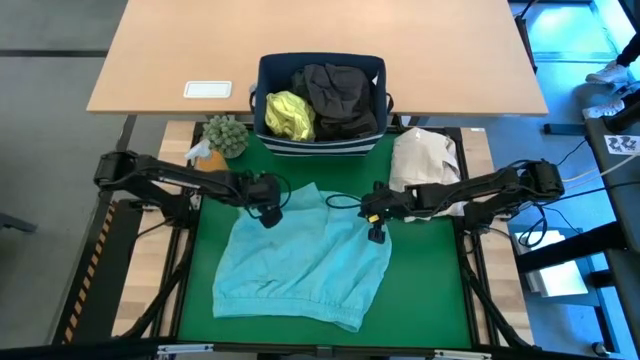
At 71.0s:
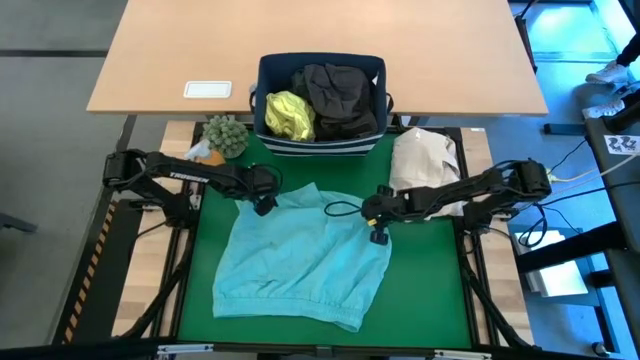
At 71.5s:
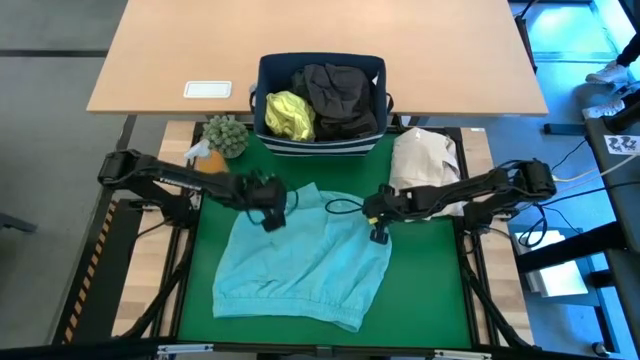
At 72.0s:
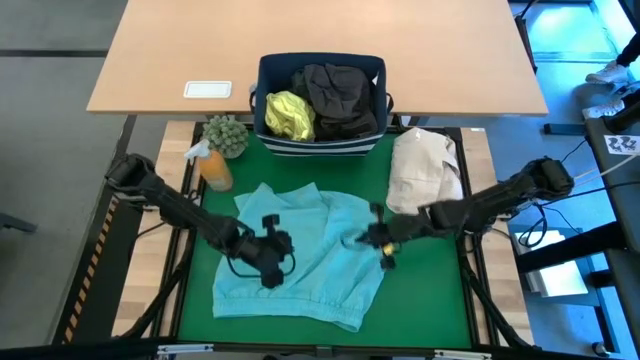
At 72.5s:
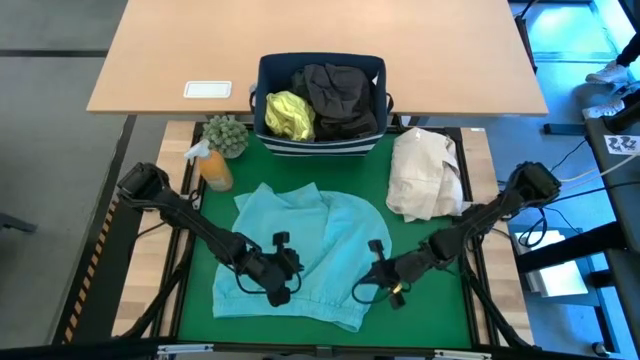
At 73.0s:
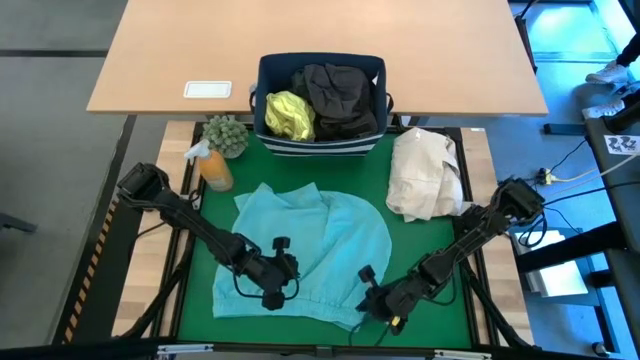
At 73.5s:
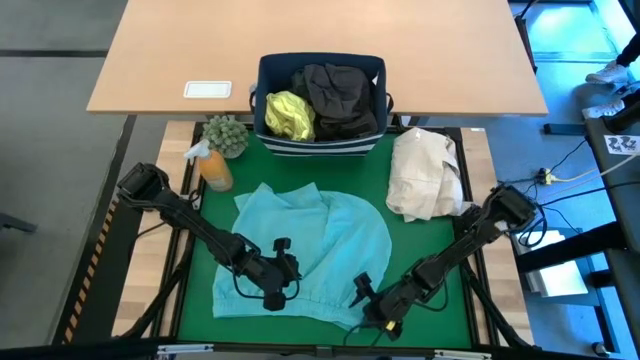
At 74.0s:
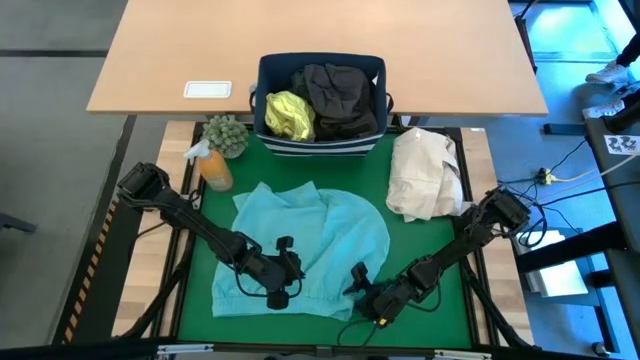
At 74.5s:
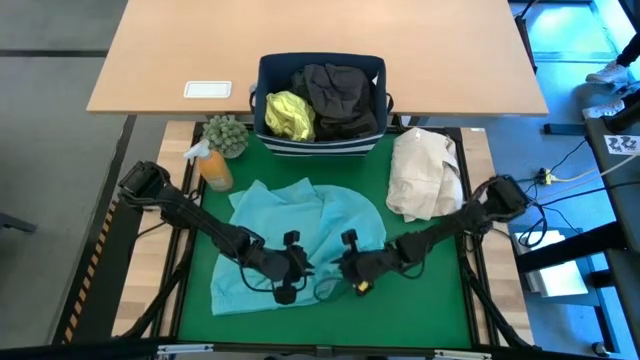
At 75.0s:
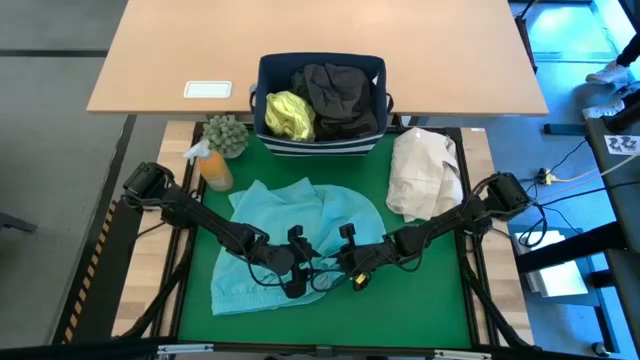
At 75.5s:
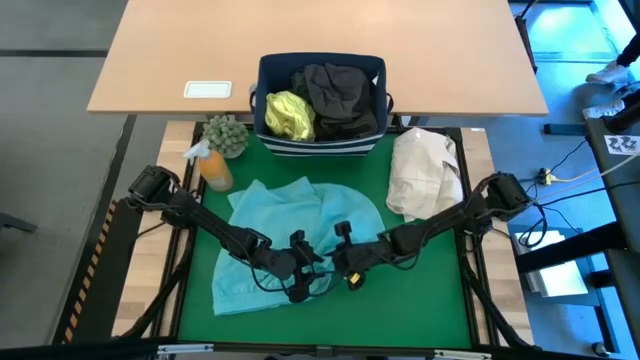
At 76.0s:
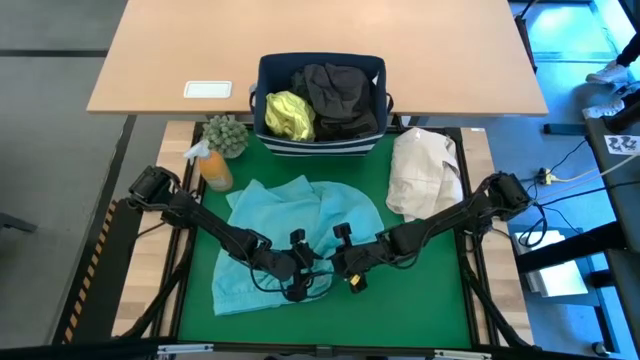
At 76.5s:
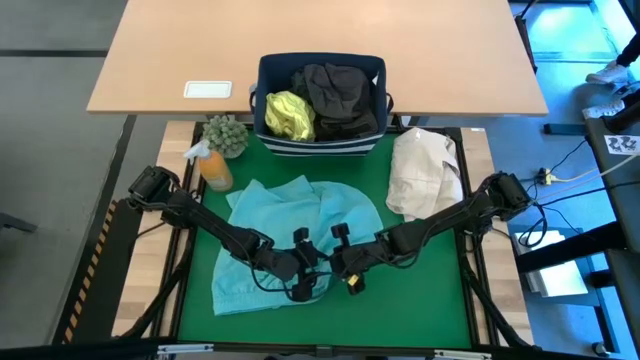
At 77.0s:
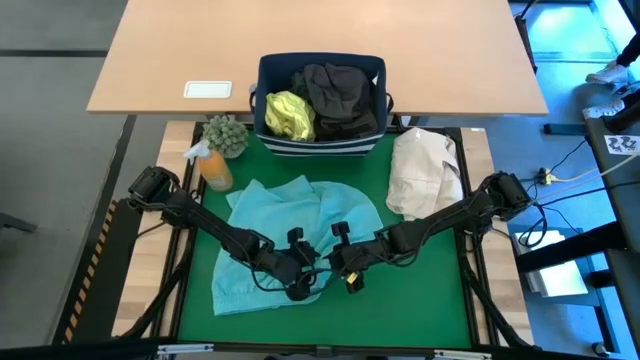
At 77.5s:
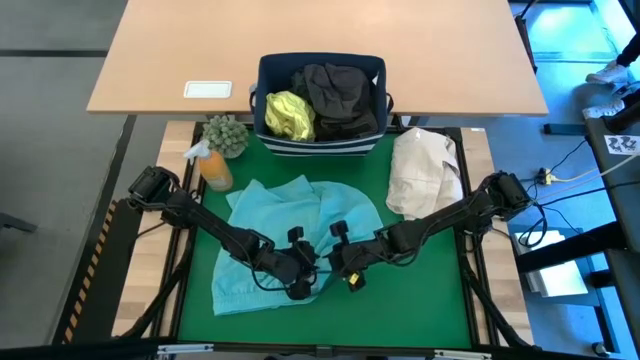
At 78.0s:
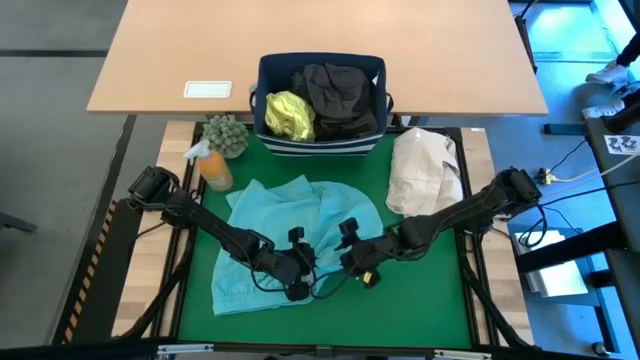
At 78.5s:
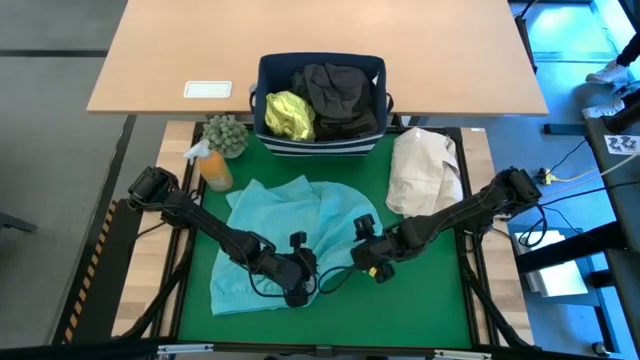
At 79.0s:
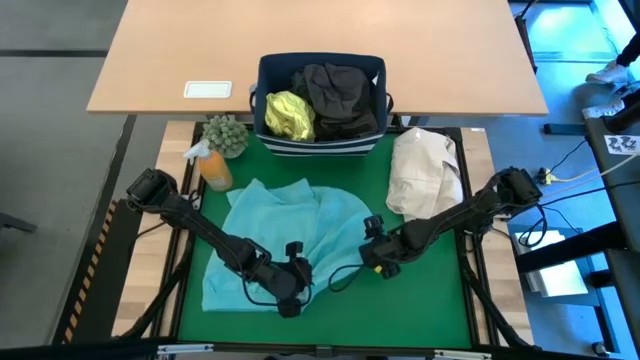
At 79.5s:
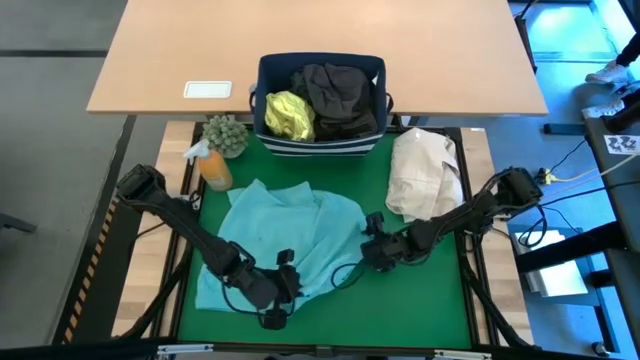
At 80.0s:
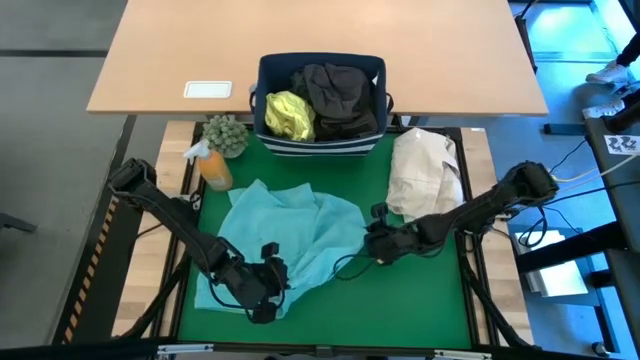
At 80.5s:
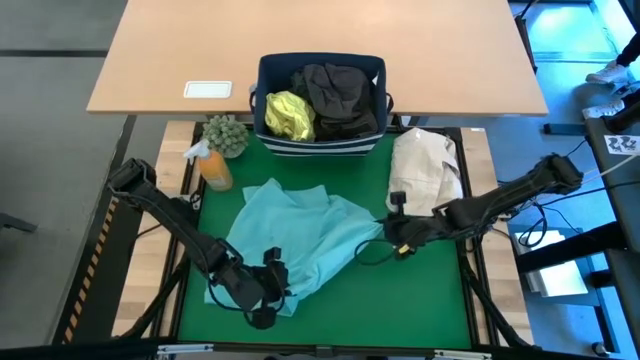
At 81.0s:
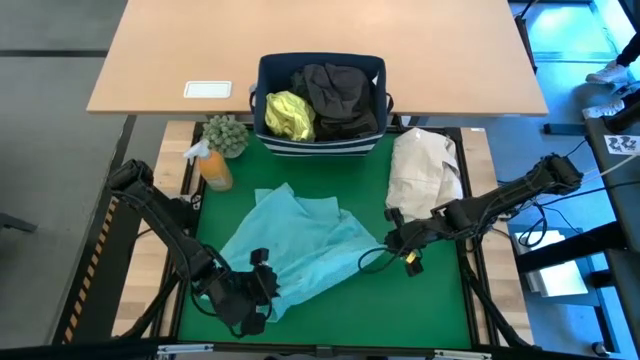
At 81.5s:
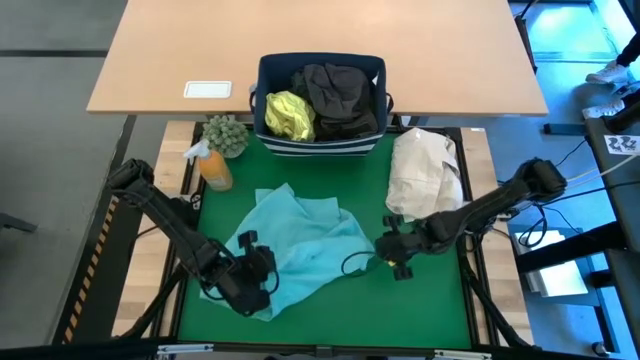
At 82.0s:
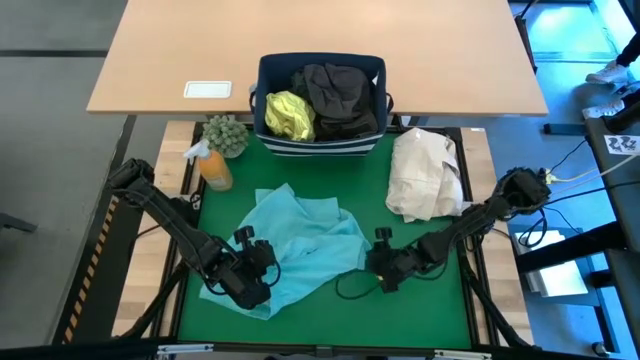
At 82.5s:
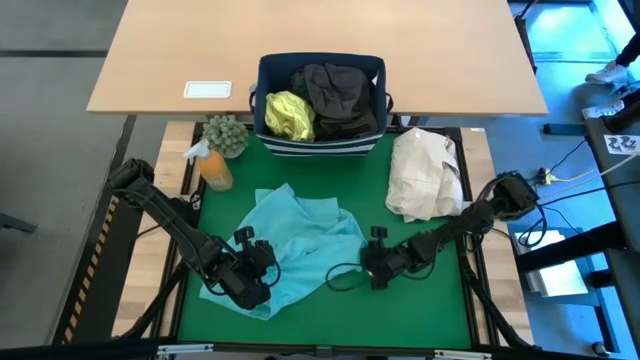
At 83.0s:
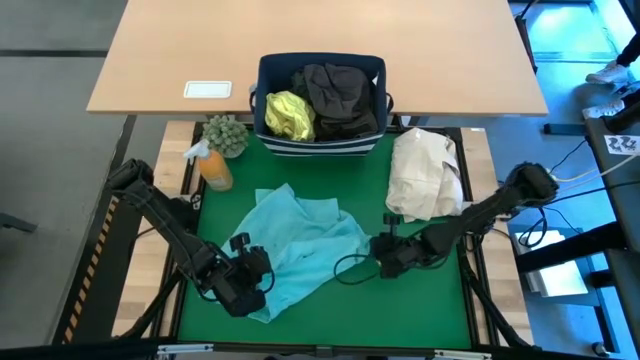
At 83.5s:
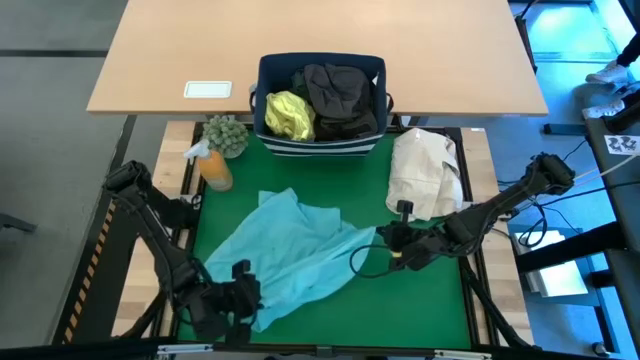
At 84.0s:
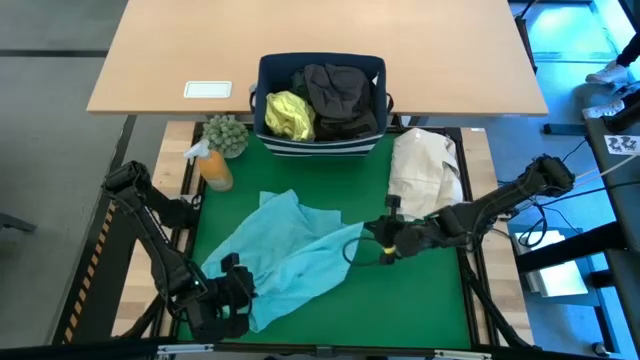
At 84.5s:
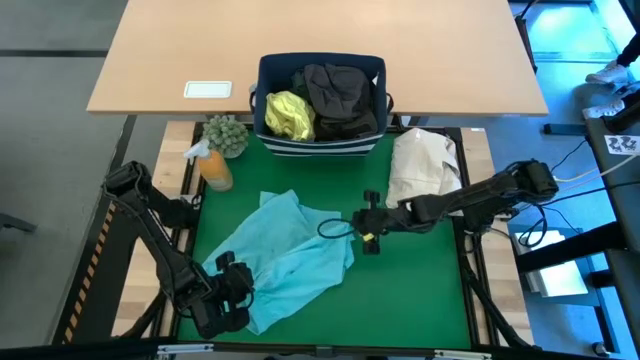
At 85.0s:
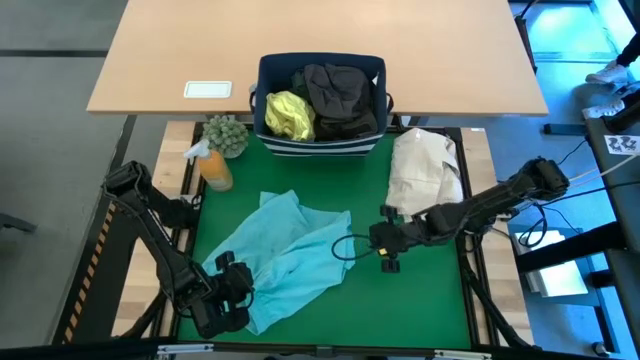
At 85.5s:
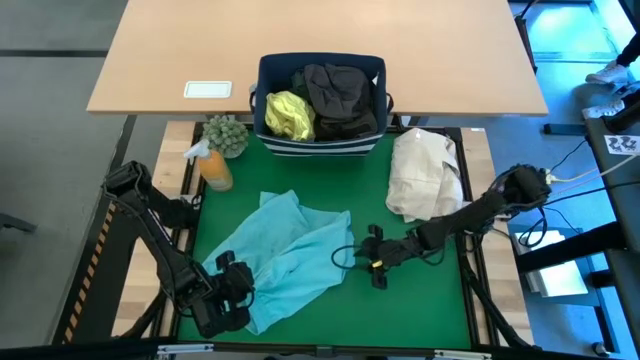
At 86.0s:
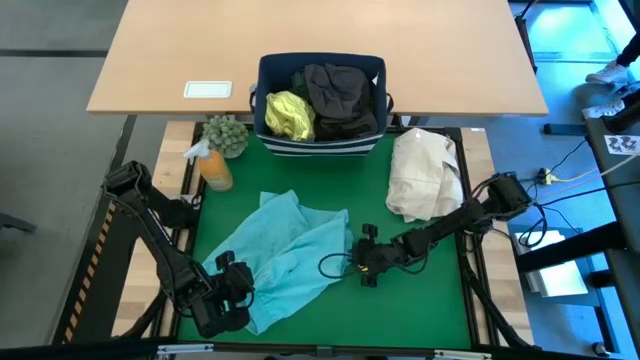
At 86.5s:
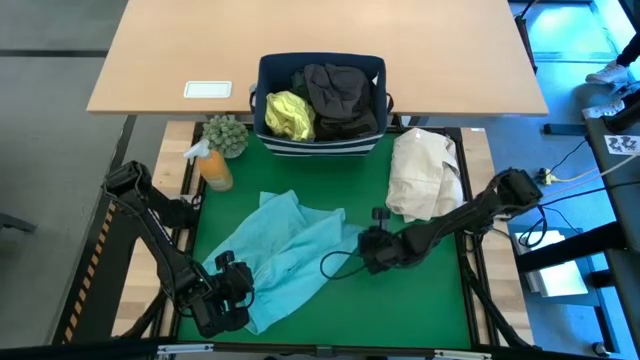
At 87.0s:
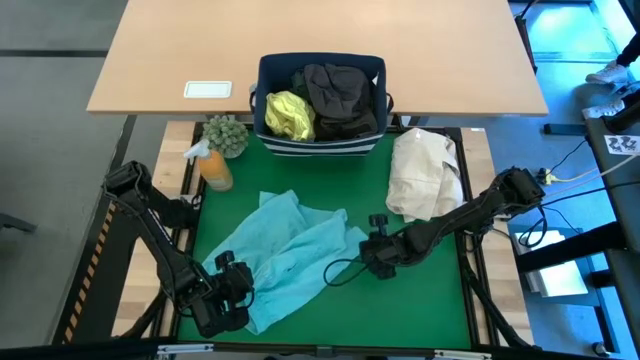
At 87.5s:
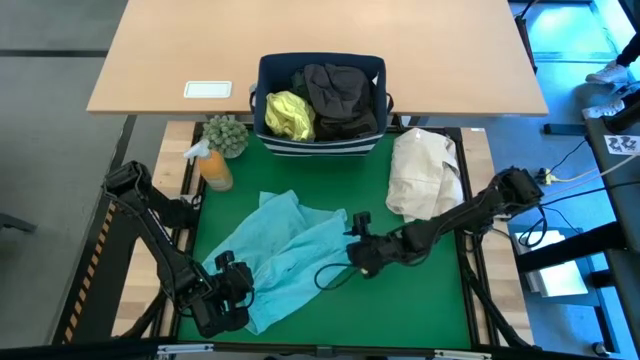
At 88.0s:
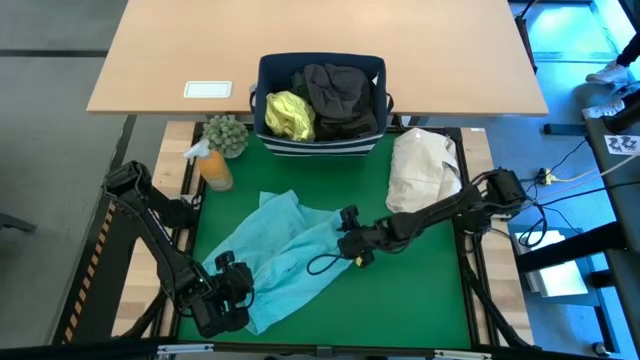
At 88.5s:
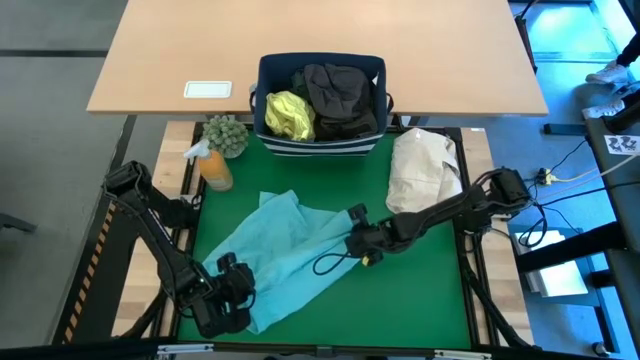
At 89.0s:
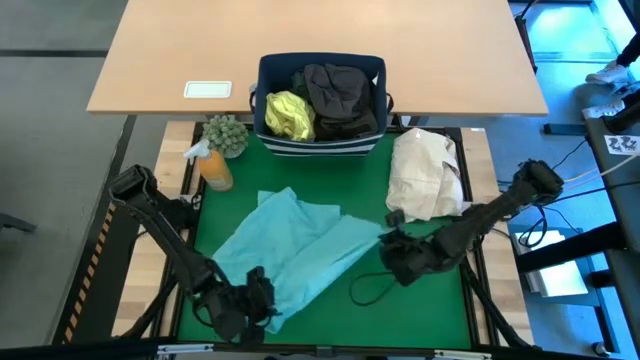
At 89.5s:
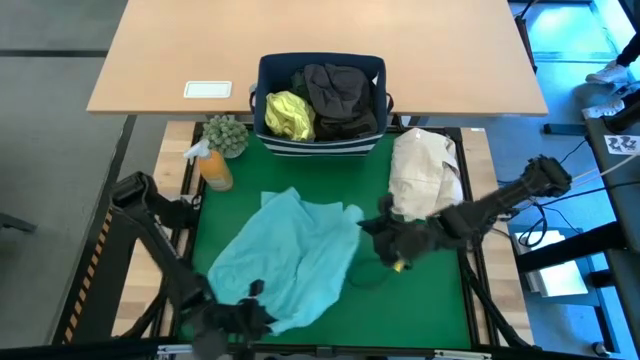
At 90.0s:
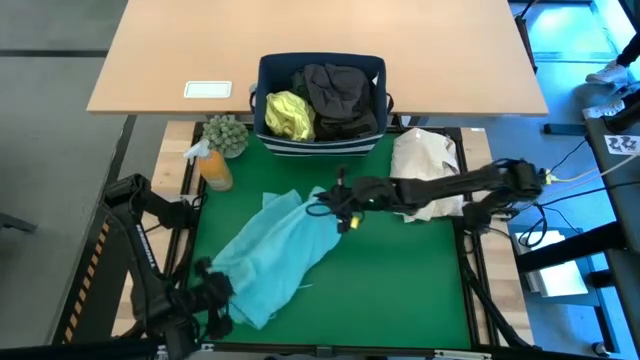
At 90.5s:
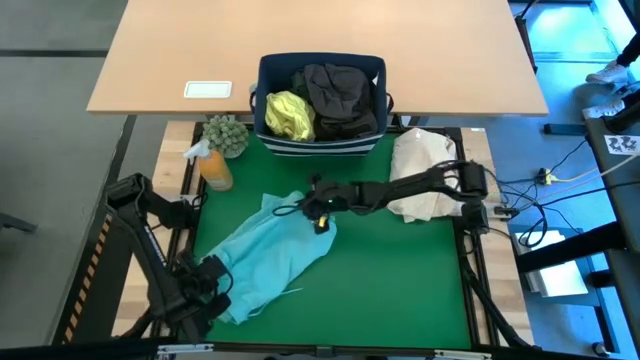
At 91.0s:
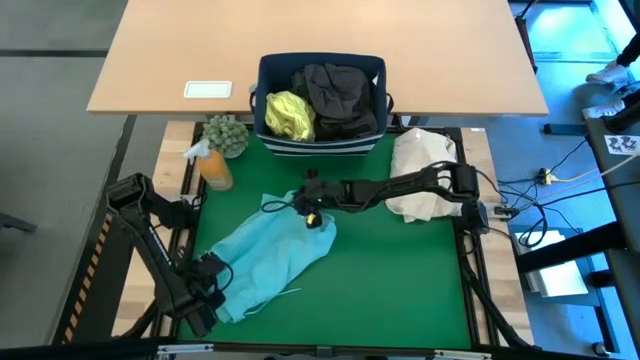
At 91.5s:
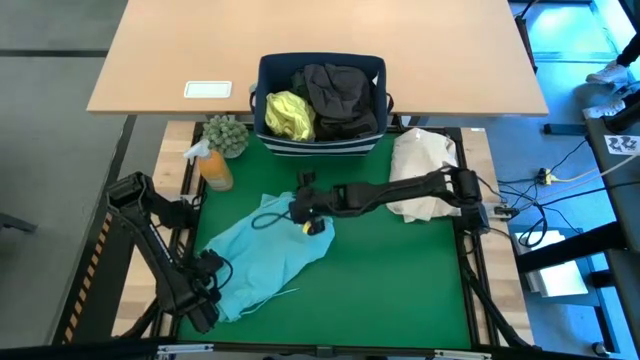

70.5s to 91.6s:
Task: Fold laundry
Fold the blue shorts
